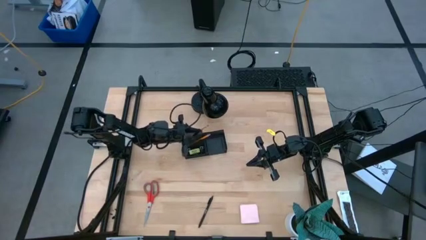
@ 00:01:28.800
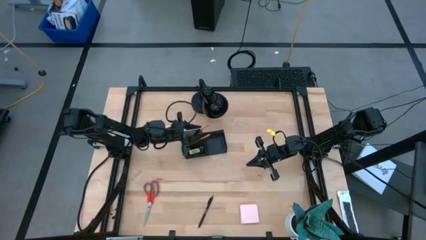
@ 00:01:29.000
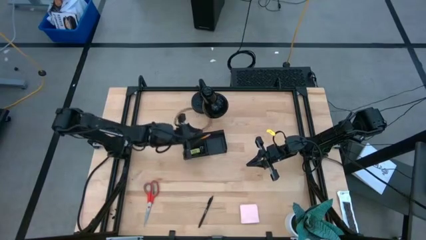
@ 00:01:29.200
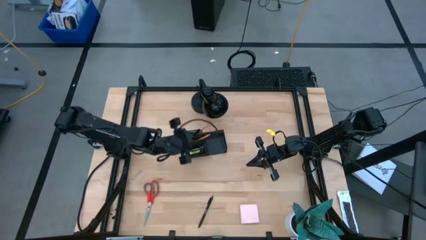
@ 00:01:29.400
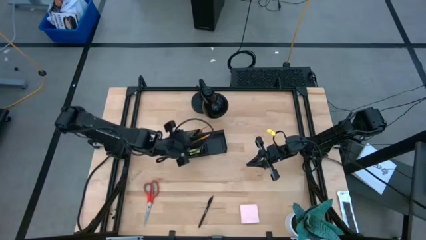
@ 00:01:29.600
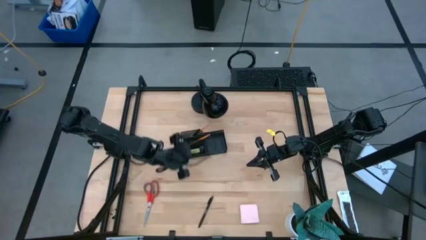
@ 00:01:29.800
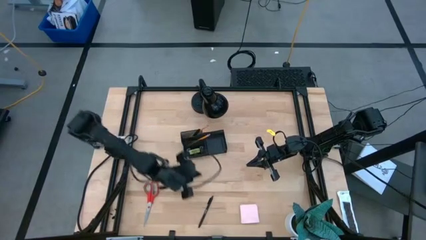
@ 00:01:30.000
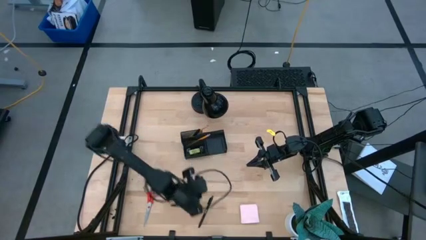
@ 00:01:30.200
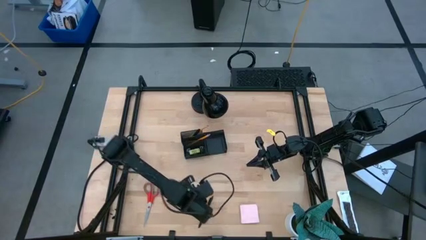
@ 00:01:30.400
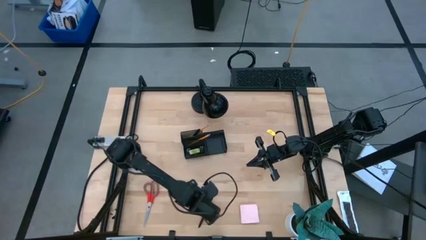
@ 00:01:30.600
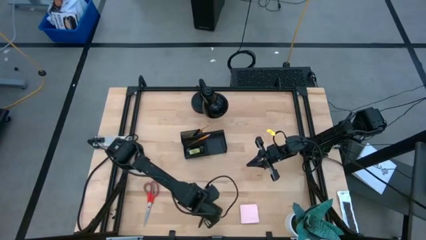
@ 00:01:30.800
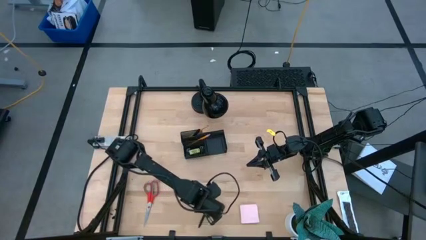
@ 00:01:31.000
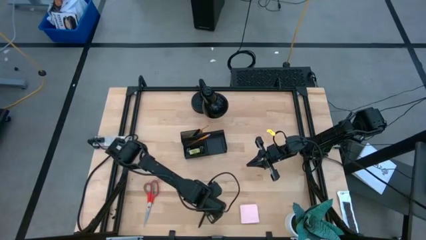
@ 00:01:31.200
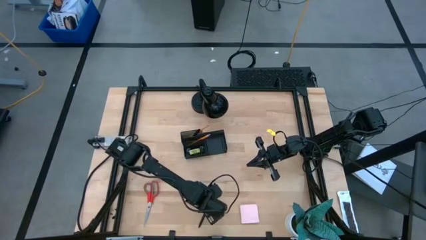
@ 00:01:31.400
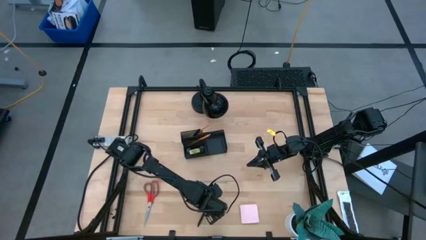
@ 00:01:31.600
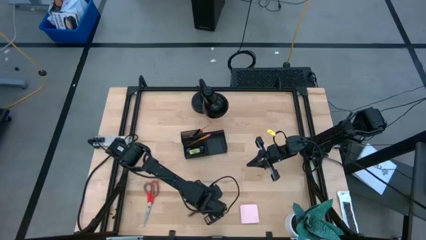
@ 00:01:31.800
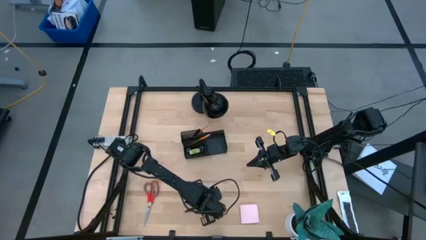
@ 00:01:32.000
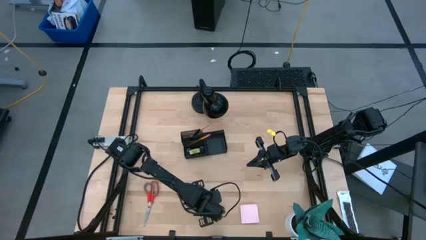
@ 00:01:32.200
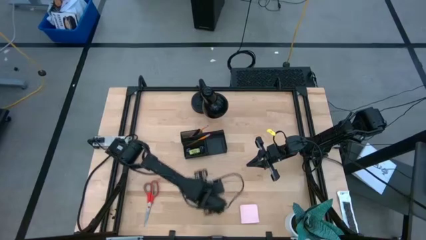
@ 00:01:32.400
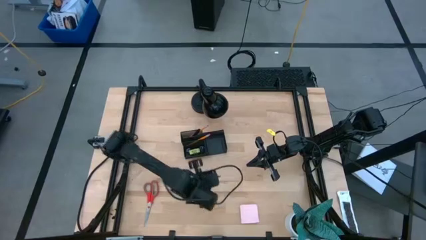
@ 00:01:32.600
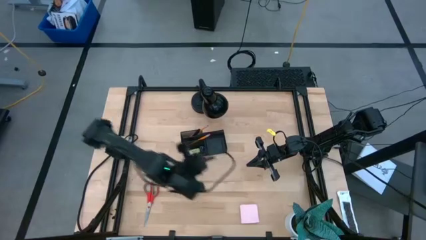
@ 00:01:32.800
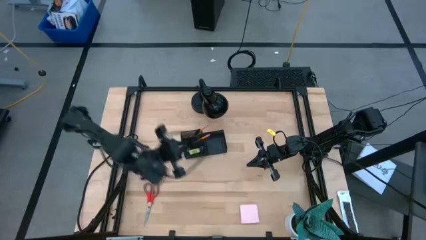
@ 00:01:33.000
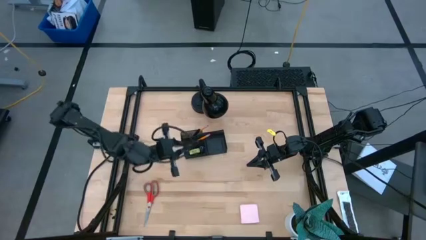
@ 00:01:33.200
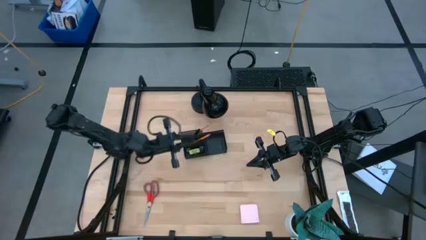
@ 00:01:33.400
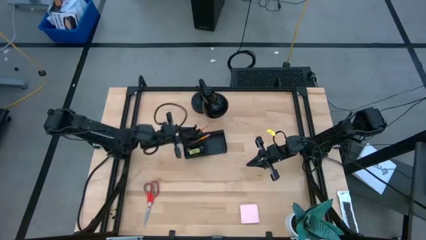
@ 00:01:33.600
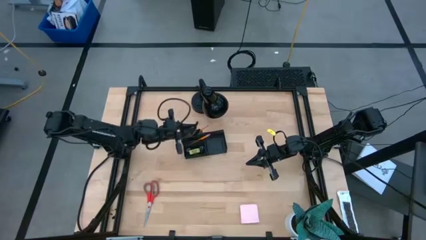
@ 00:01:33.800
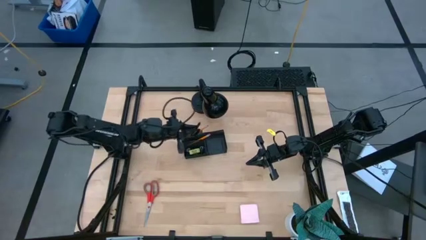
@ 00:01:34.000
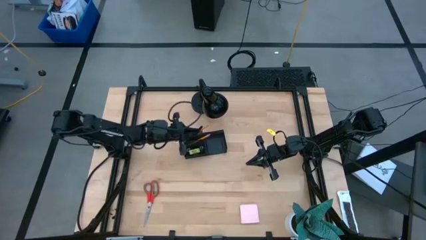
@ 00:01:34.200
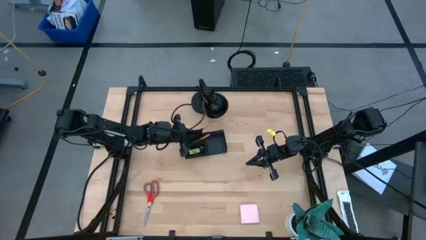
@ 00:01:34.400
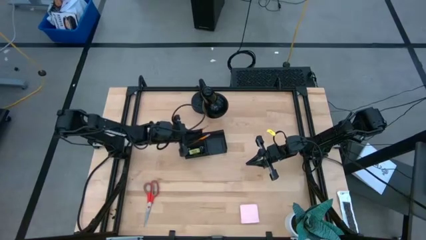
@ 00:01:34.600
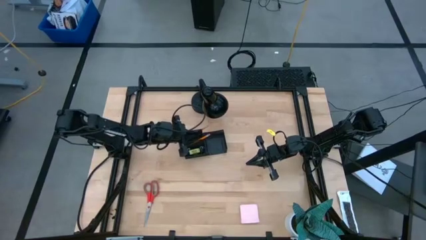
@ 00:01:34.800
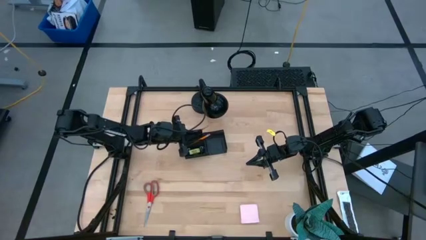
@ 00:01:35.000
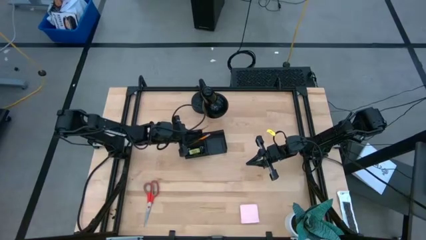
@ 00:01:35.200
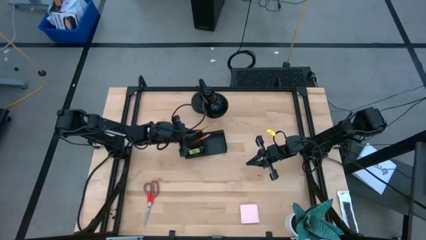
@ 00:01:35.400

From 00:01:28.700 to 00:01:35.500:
Task: Pick and place office supplies into organizer
Put the black pen into the black desk organizer

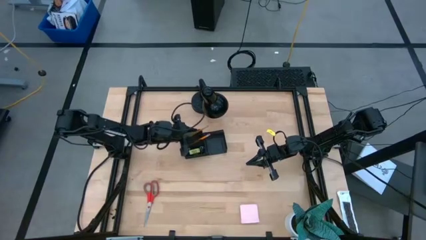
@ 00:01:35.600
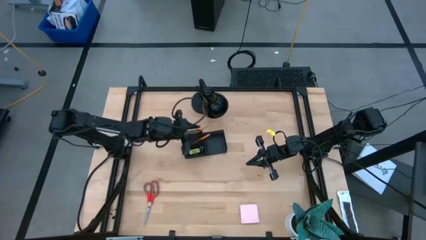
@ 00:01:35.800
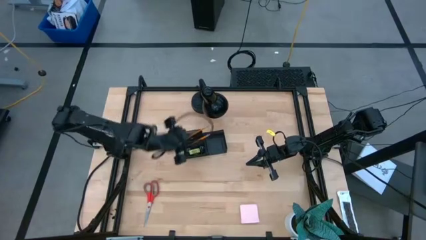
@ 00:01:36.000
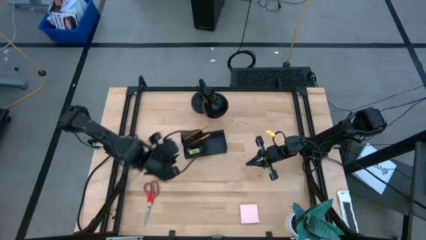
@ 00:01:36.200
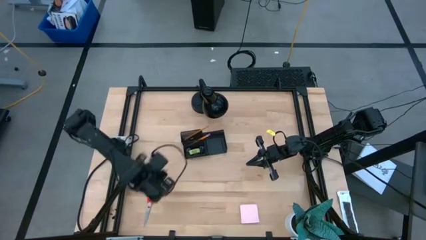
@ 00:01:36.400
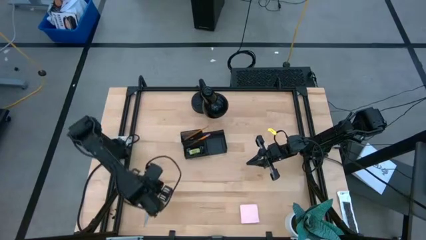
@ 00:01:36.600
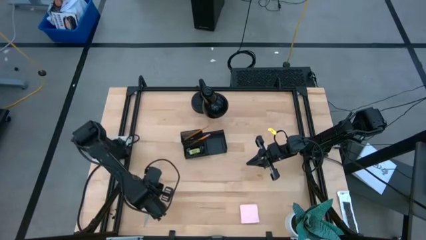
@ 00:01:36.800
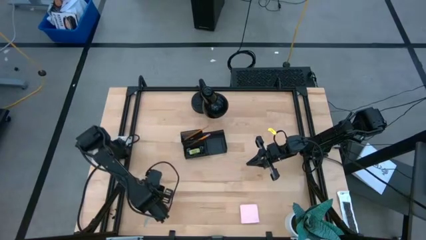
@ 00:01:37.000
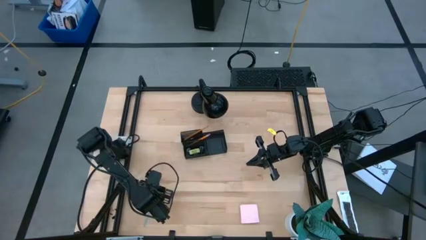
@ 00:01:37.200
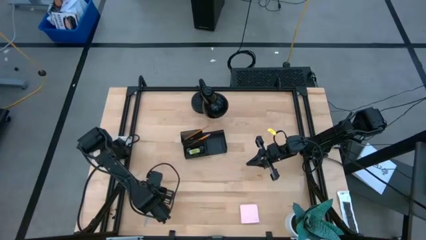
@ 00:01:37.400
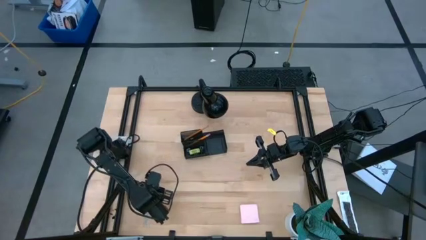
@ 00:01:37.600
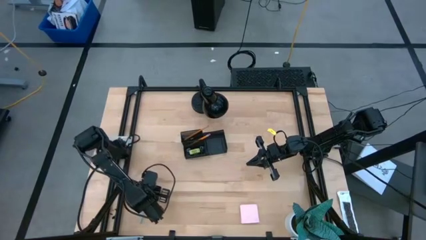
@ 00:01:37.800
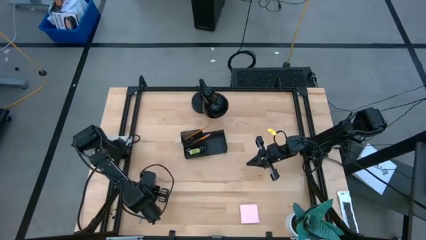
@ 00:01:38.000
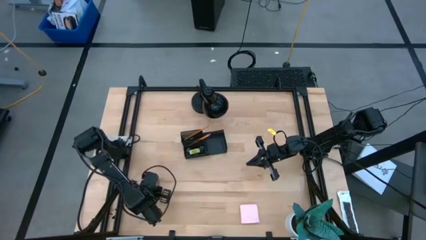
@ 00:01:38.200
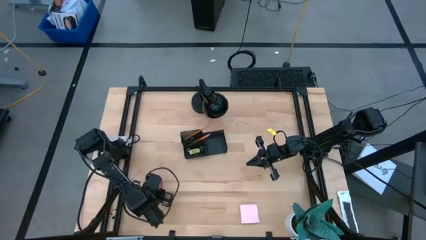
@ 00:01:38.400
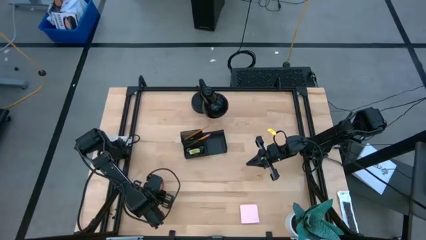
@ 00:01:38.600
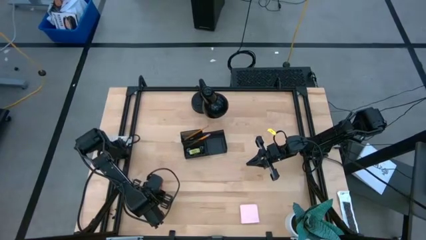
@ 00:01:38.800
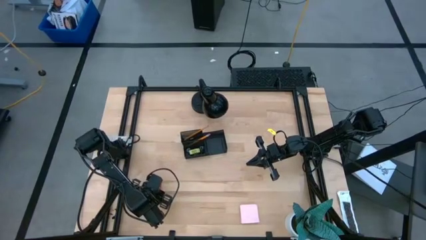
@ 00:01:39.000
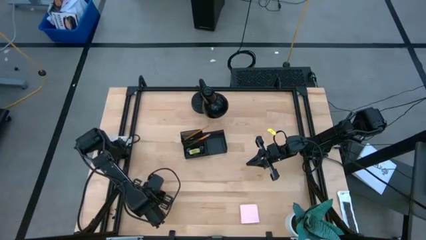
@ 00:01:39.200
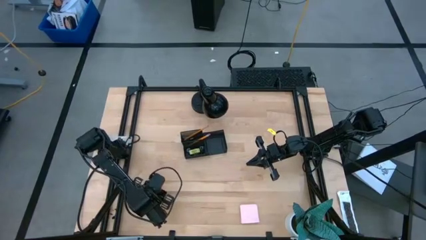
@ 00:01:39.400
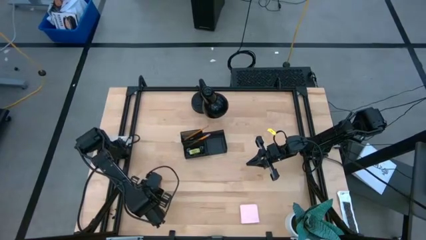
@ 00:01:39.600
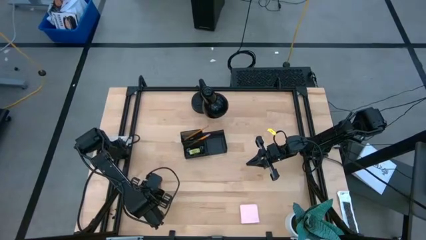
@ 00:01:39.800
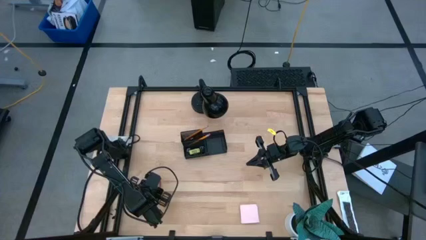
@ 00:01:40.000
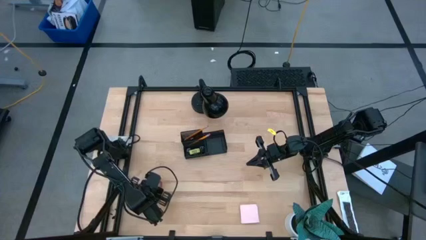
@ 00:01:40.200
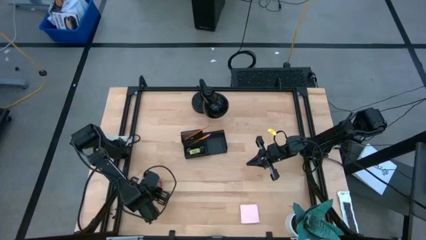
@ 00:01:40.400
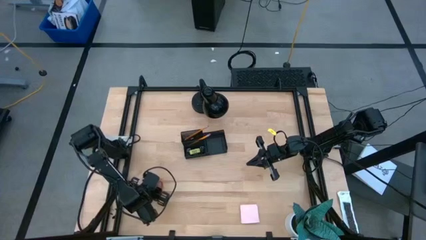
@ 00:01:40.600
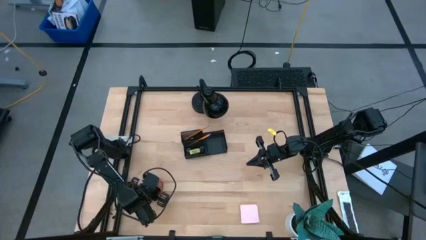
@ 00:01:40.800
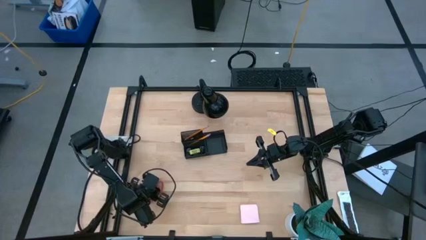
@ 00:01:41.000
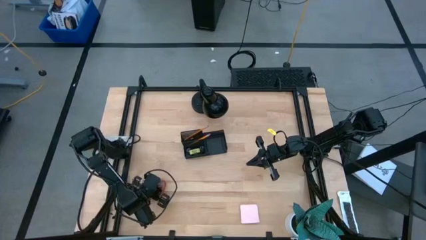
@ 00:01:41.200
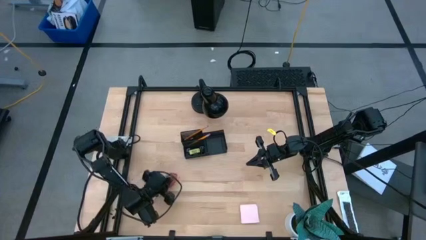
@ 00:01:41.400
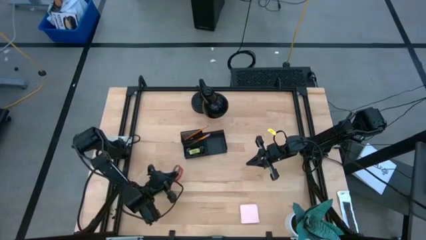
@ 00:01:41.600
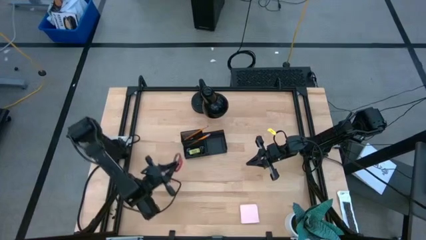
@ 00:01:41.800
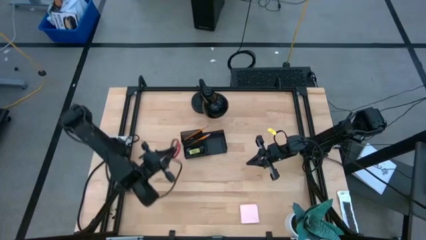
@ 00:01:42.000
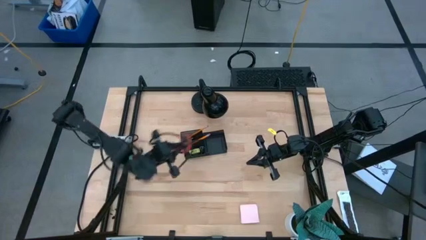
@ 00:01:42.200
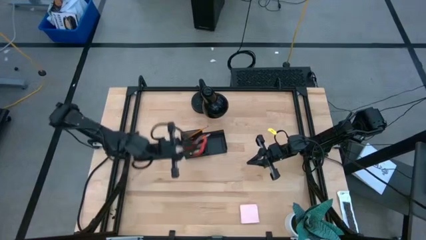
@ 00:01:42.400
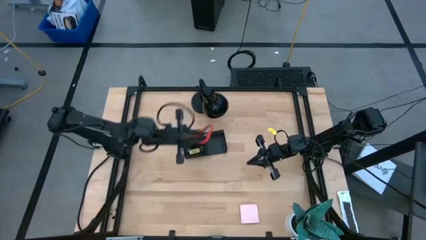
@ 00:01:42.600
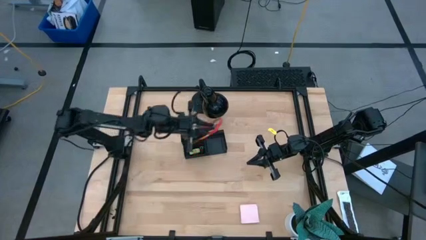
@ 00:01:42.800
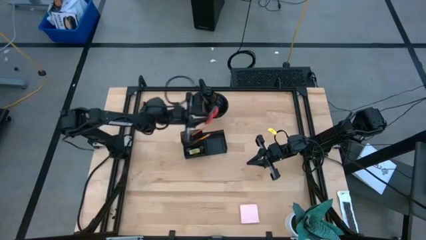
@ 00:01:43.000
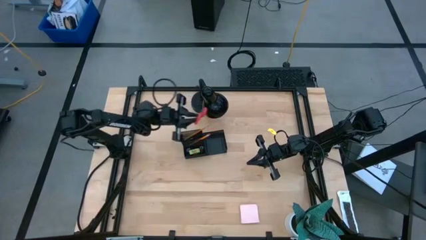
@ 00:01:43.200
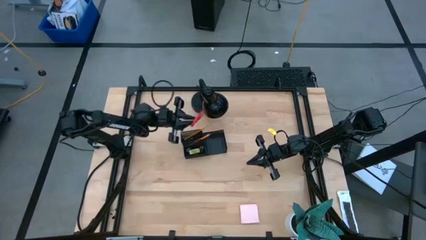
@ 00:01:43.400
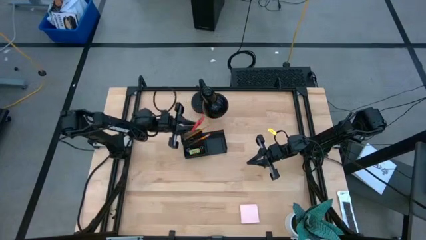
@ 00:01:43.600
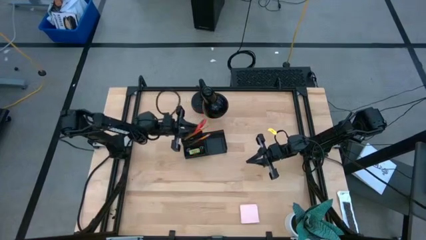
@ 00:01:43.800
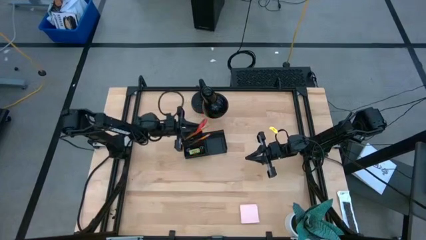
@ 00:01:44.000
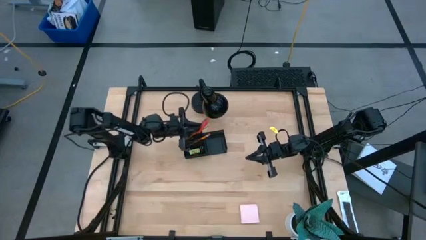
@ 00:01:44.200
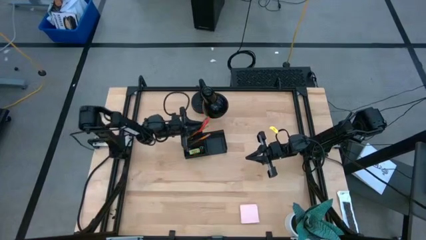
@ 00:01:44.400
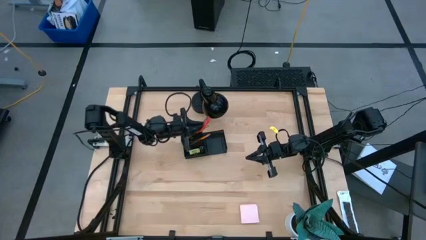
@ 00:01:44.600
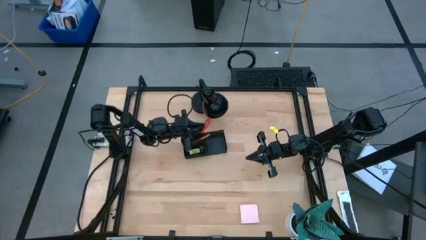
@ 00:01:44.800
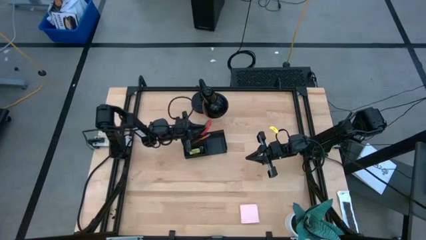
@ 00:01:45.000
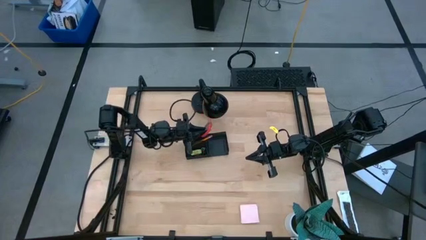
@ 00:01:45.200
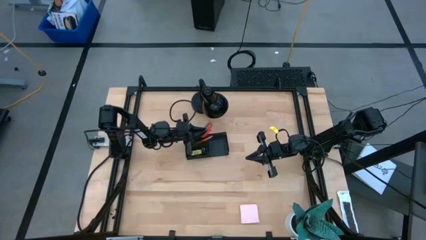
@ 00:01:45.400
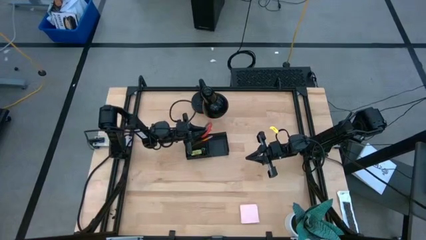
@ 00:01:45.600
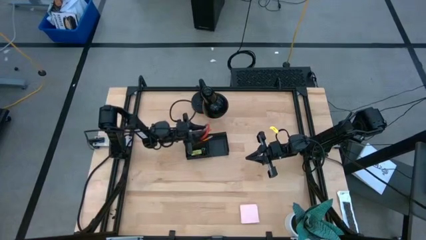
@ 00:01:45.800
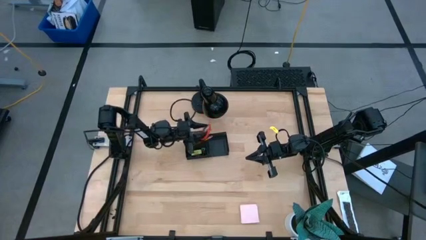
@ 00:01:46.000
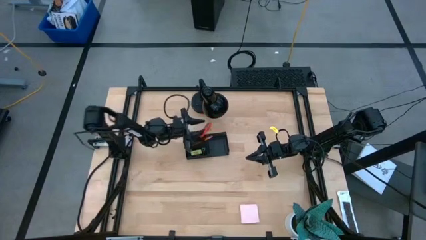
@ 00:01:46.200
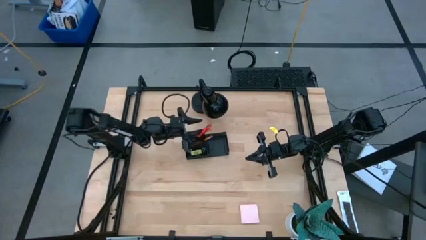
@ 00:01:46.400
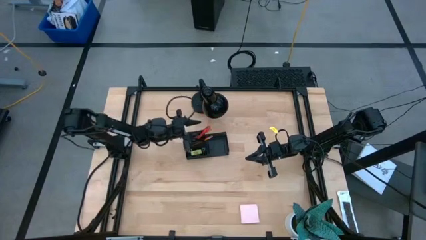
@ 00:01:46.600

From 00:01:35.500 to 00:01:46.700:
Put the red scissors into the black desk organizer
